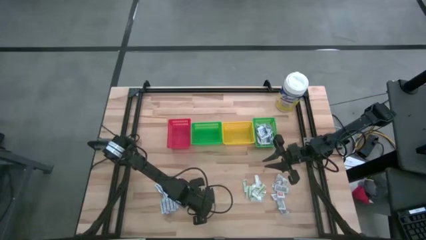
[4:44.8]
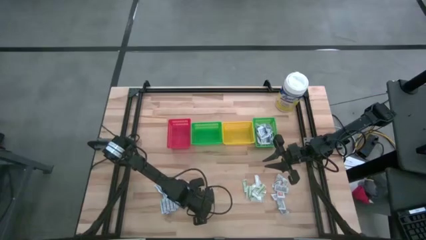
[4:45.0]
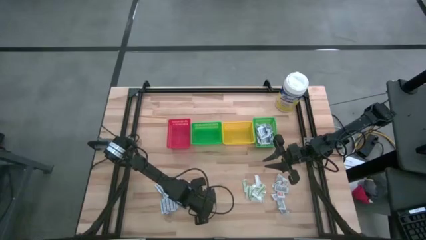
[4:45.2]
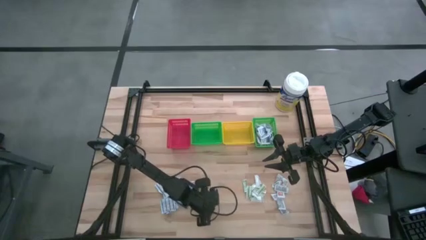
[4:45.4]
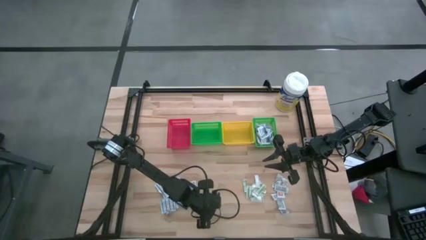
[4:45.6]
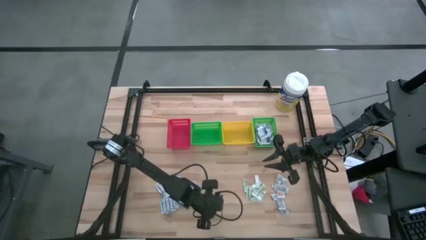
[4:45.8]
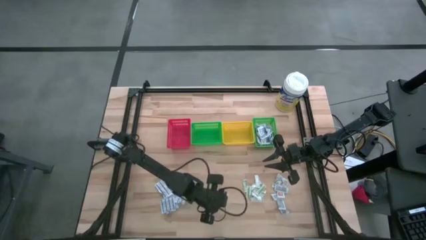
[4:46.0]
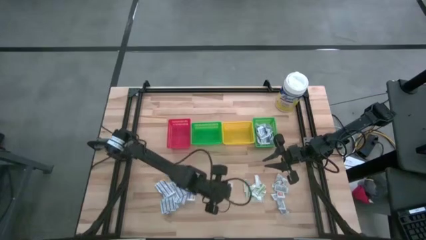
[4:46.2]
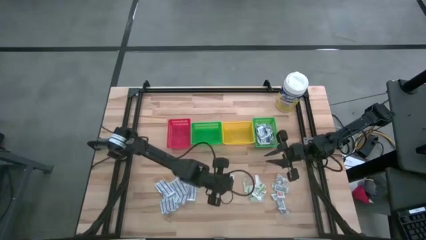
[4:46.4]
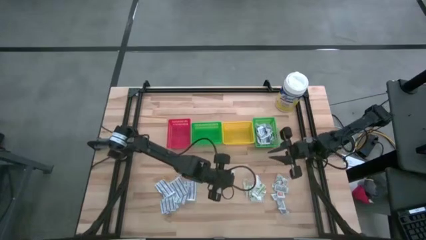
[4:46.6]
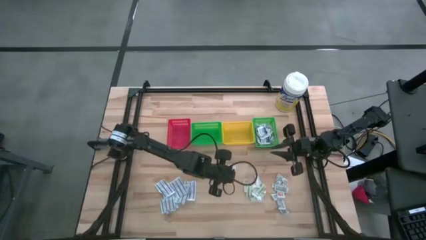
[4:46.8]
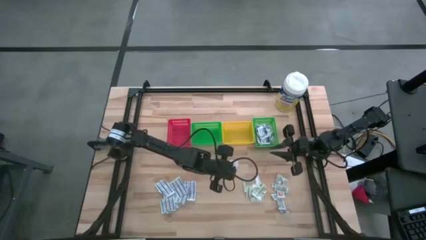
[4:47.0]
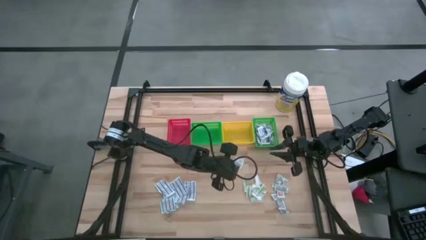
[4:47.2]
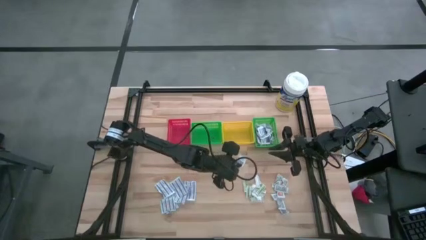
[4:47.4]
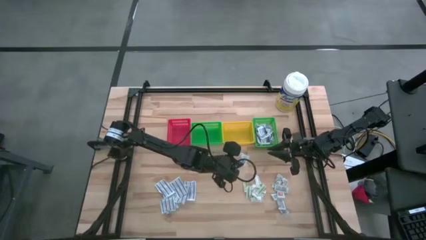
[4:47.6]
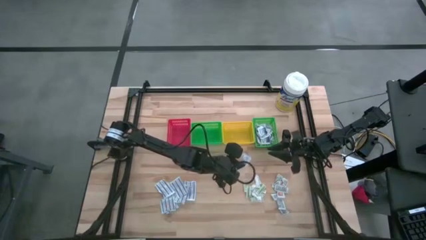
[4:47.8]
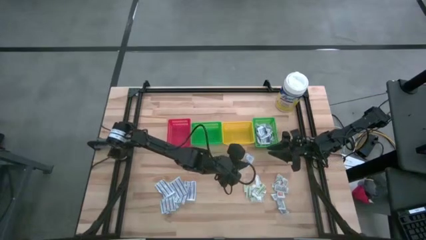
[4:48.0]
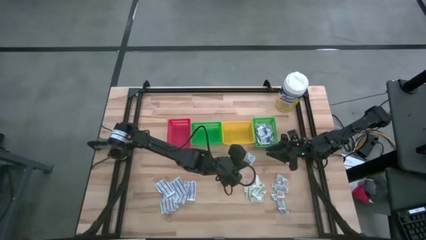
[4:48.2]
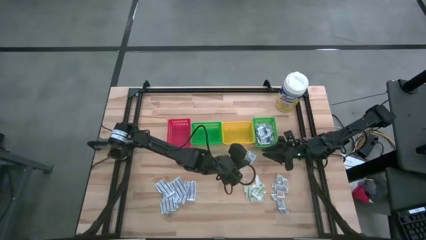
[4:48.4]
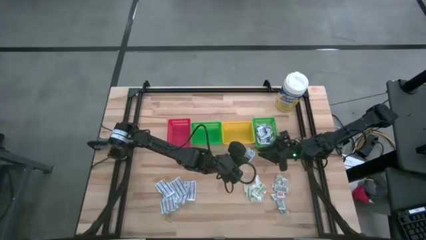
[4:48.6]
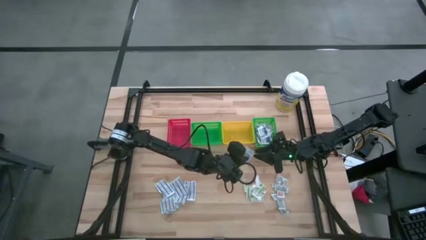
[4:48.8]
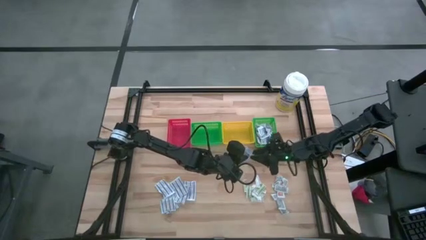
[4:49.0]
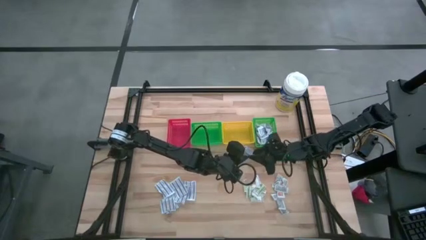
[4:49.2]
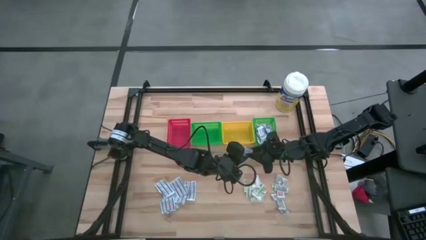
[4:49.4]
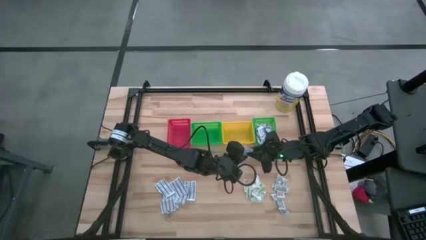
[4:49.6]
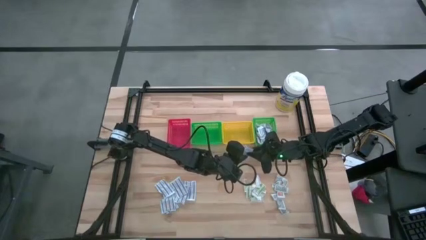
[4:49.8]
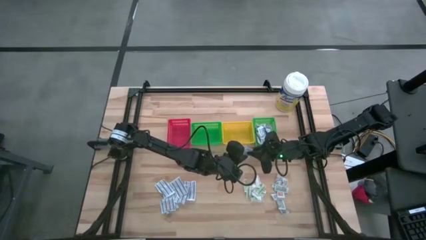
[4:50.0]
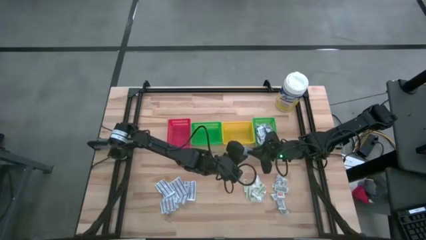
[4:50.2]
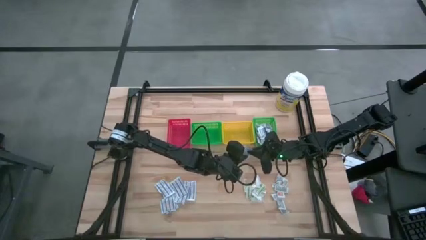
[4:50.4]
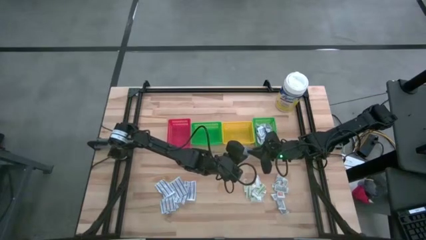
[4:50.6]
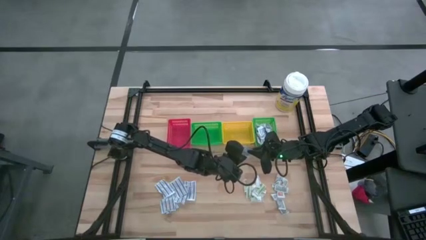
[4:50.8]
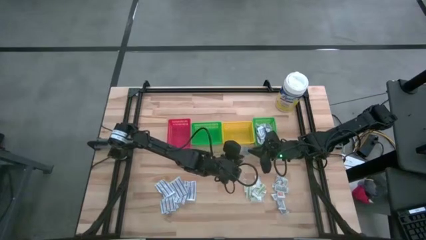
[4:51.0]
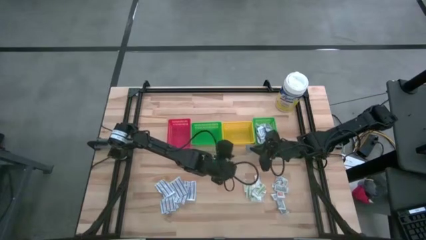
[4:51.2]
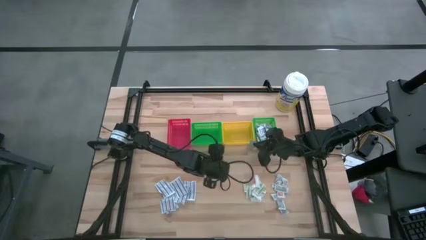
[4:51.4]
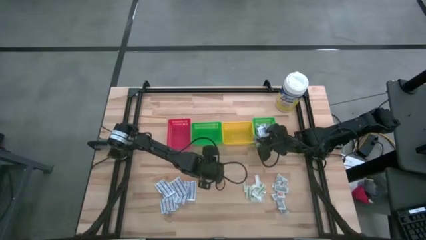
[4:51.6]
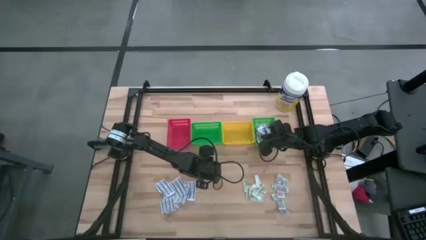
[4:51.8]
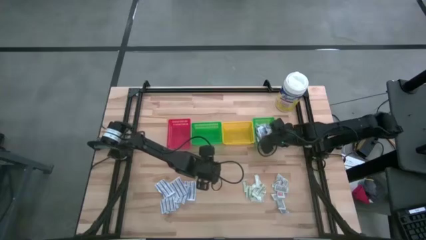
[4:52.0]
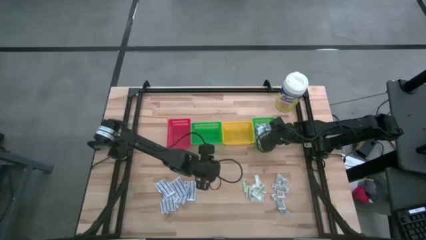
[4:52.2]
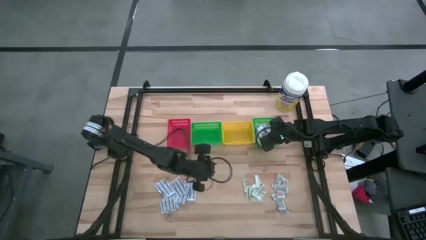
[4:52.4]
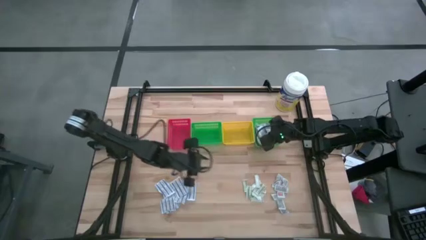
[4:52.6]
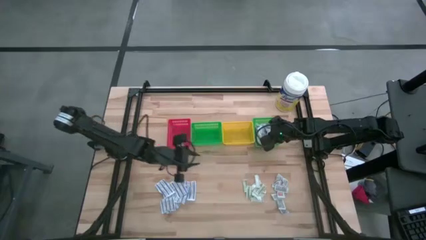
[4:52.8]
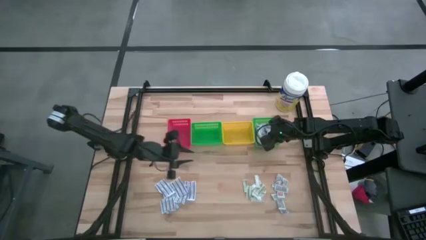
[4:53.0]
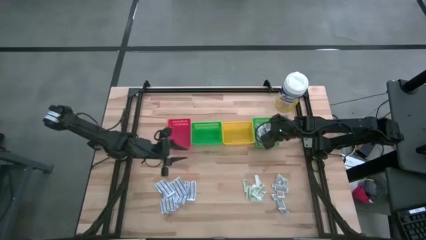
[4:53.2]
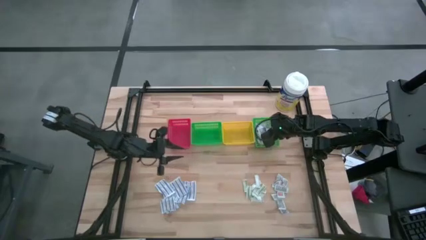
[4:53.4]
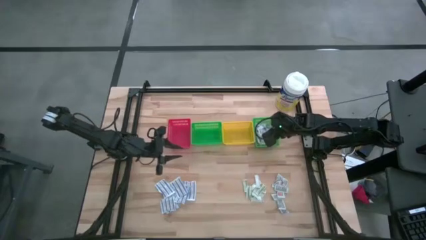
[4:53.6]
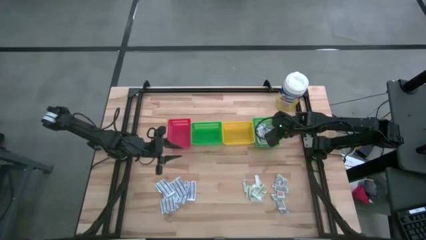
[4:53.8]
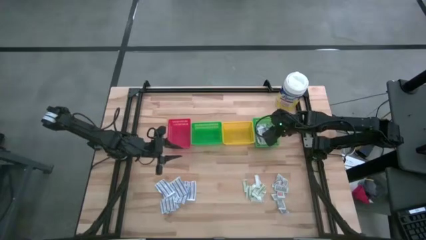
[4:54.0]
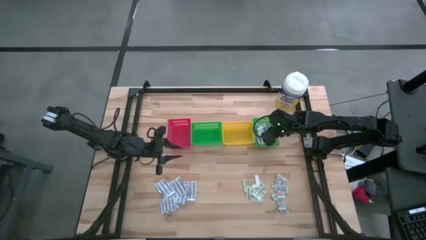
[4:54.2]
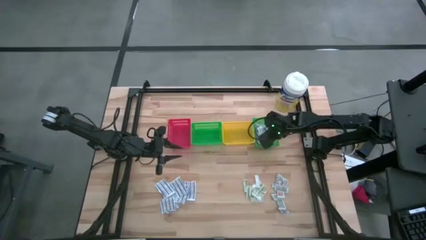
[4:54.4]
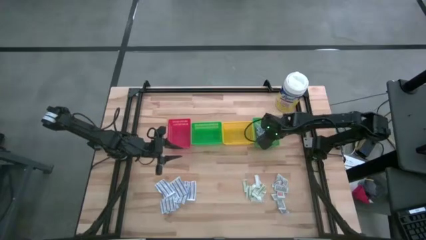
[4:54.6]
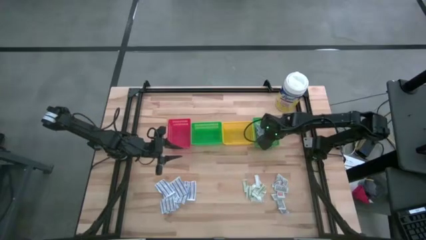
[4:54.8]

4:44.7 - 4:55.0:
Task: Pick & Place First Aid Supplies
Put the blue alcohol pad into the right green bin
